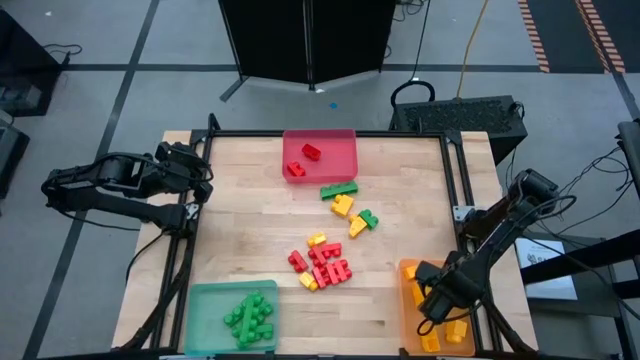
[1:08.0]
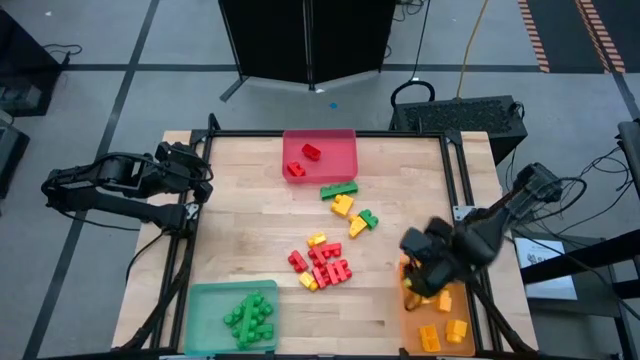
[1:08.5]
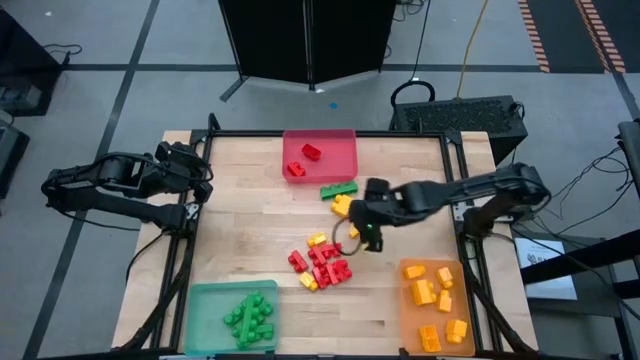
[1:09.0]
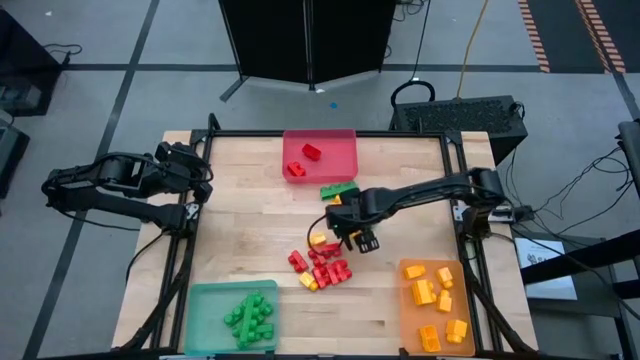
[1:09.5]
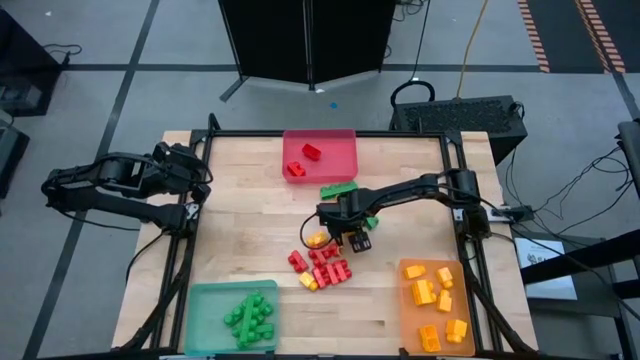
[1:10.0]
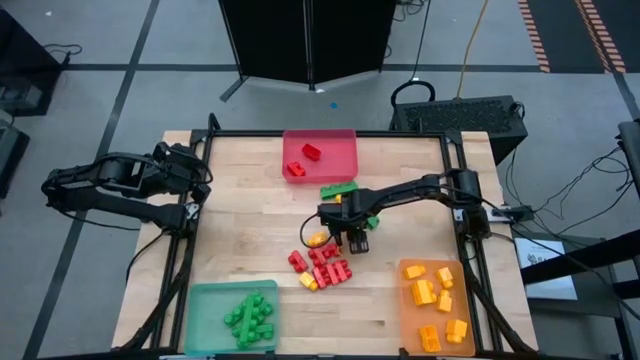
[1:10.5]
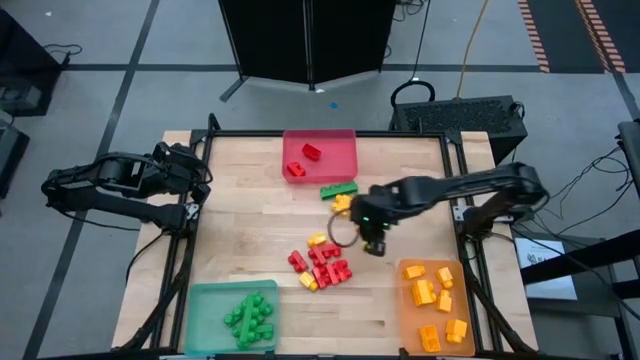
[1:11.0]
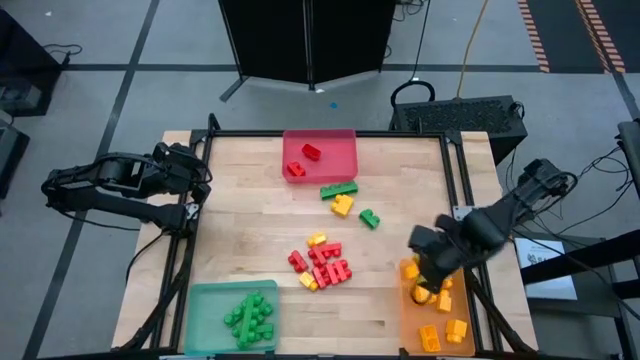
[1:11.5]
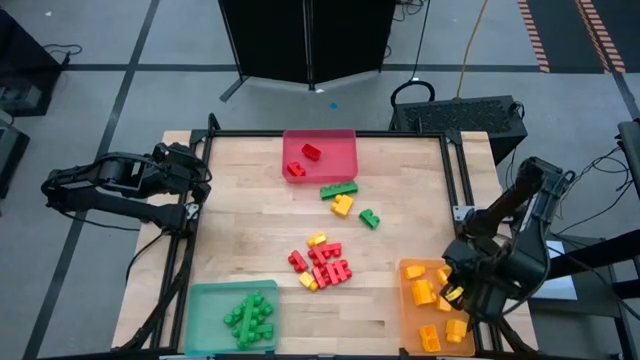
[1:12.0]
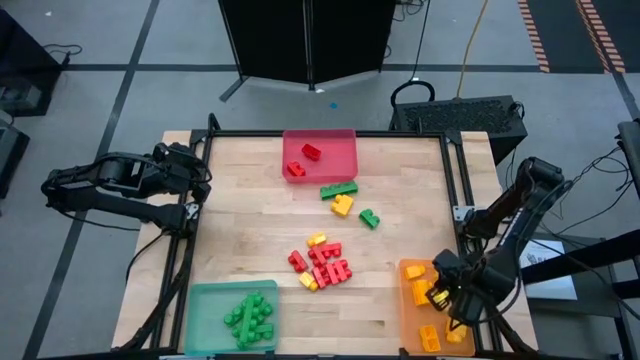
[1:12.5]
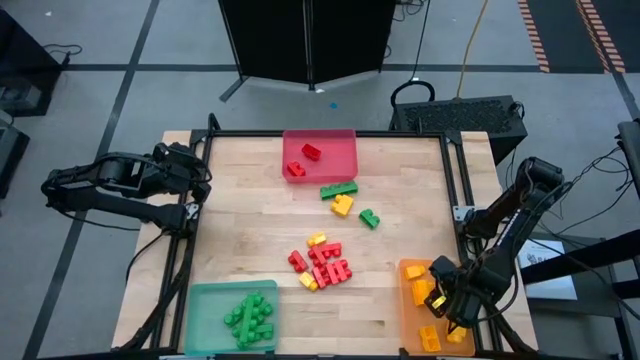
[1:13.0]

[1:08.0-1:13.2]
Task: Sort blocks
Put the yellow game piece into the orange bin

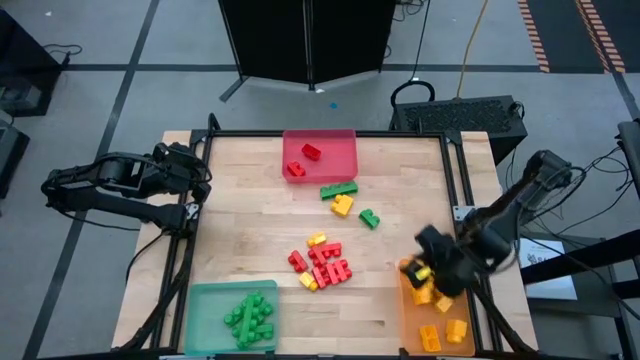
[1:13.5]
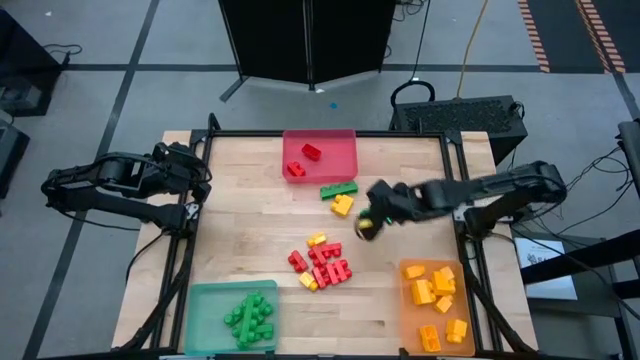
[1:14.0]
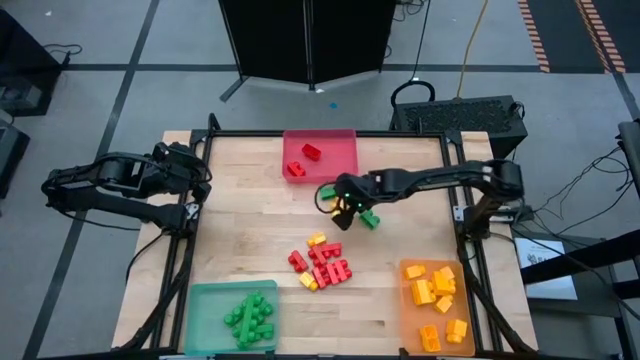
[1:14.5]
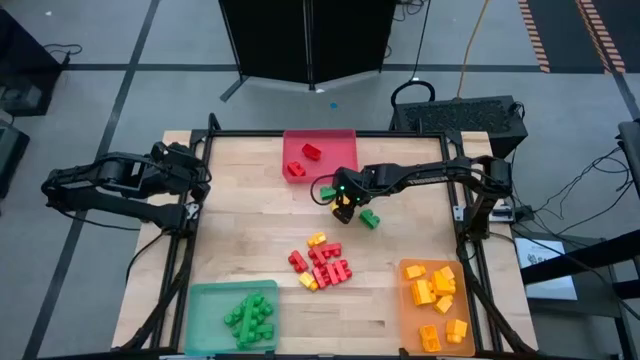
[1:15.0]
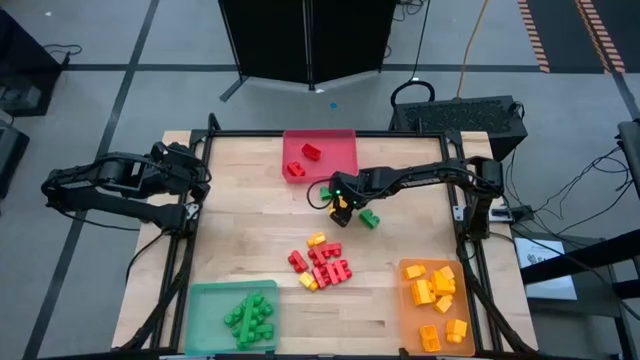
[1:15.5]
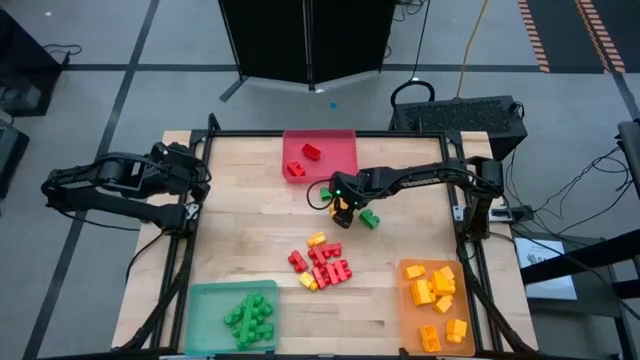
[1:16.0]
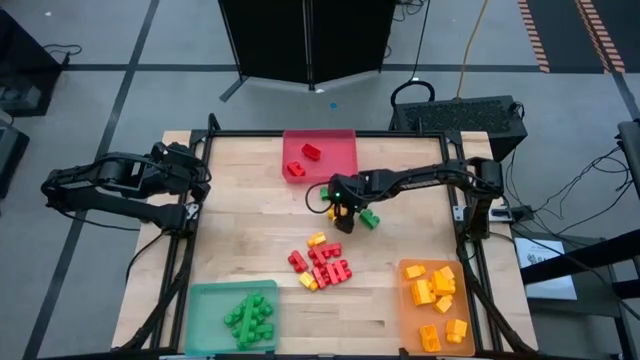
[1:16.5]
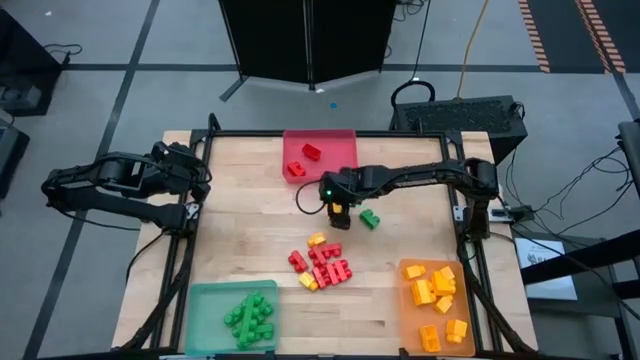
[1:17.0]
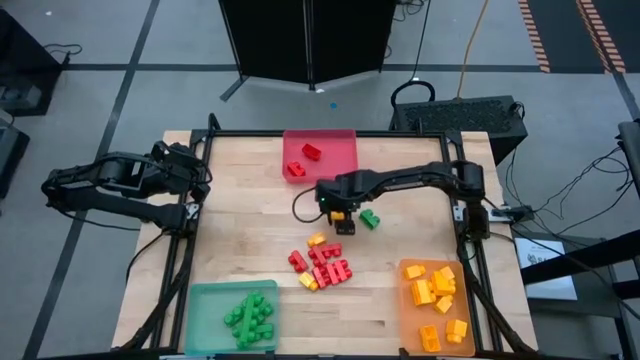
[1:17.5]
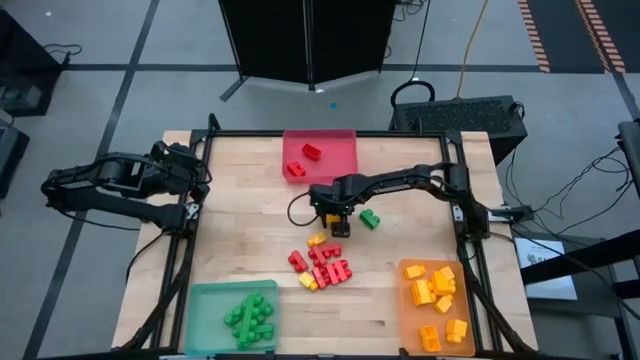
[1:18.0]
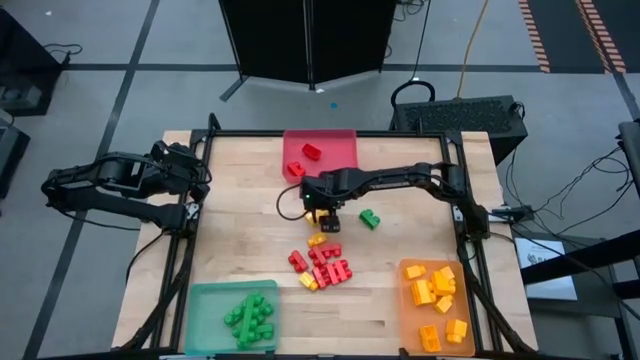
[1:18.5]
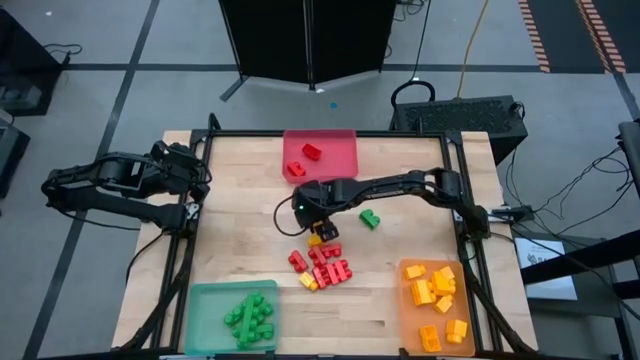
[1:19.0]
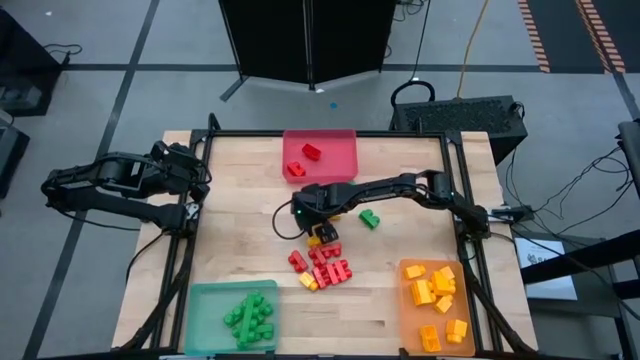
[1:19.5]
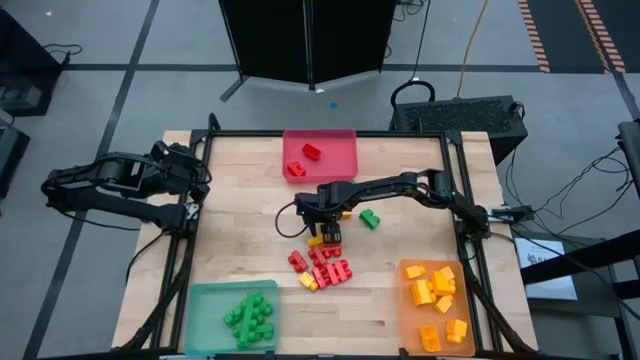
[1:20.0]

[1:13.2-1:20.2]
Put the yellow game piece into the orange bin

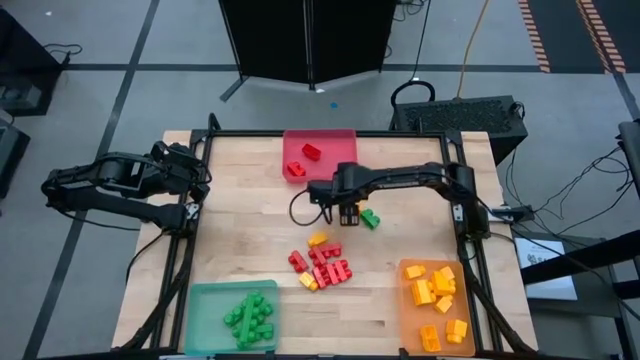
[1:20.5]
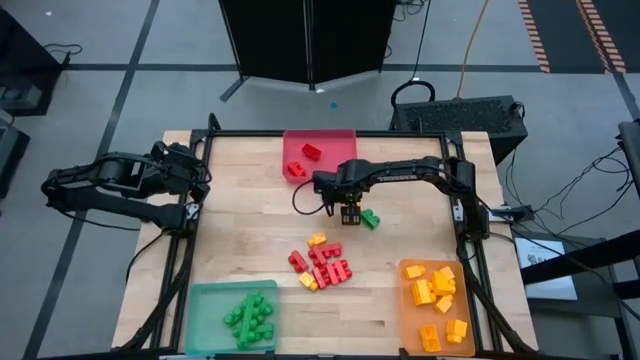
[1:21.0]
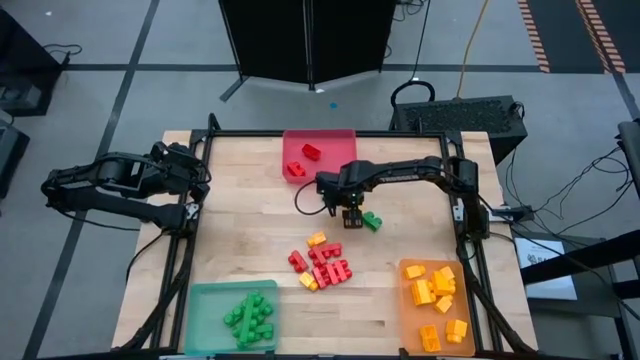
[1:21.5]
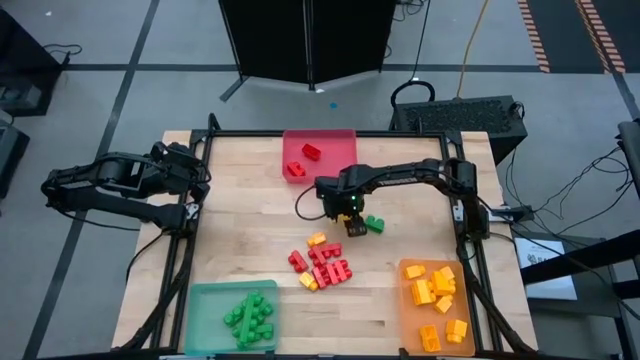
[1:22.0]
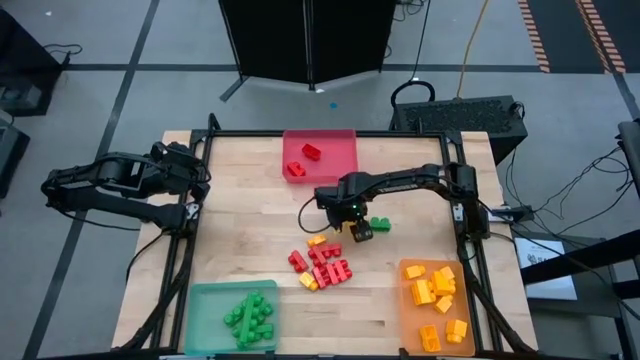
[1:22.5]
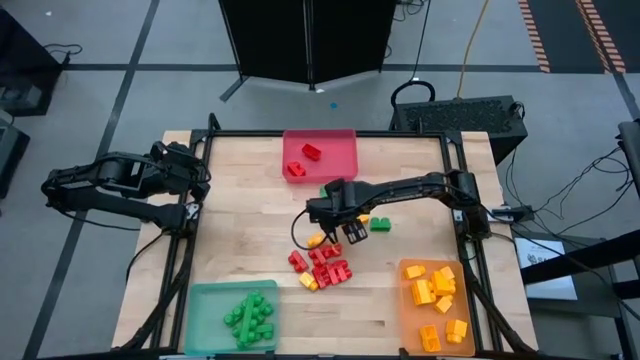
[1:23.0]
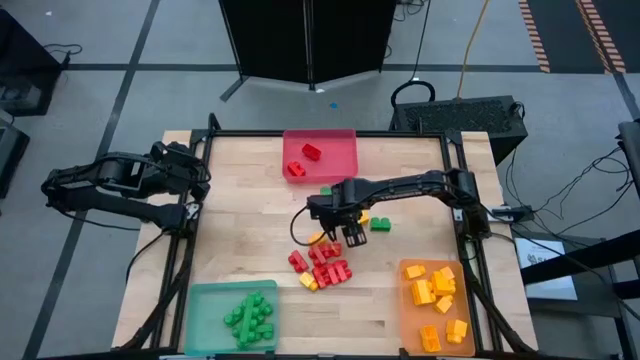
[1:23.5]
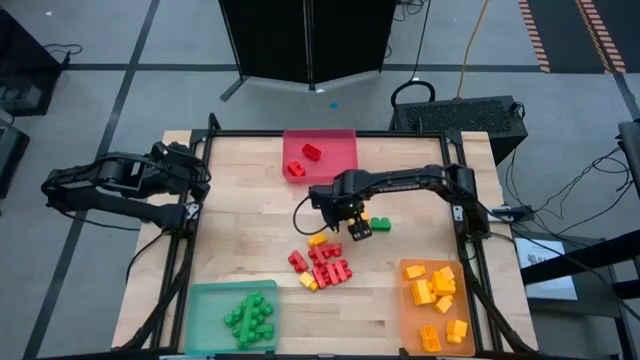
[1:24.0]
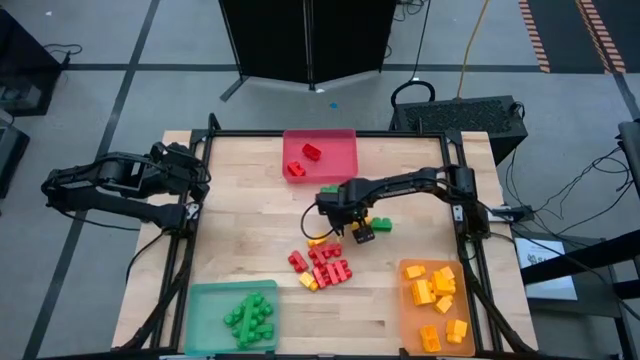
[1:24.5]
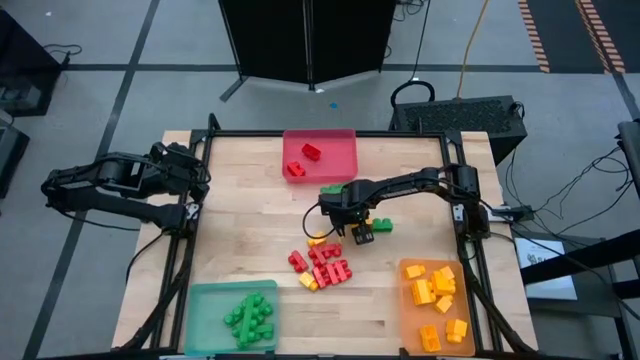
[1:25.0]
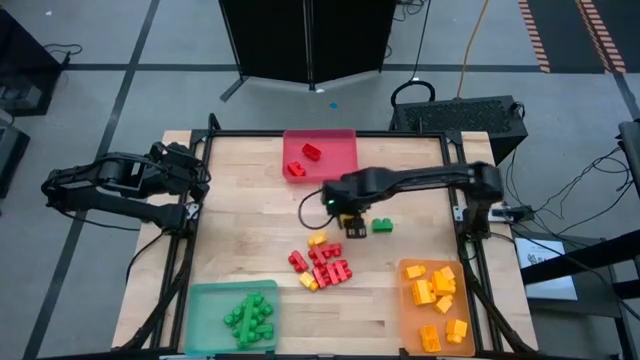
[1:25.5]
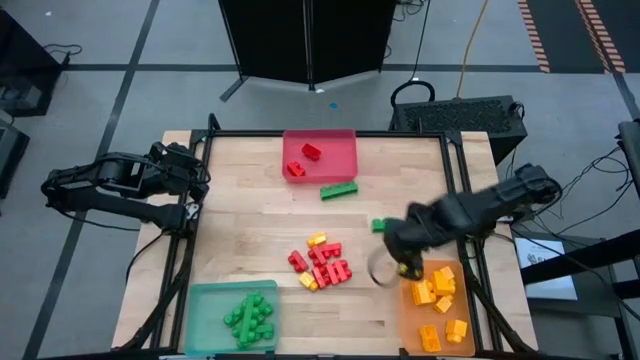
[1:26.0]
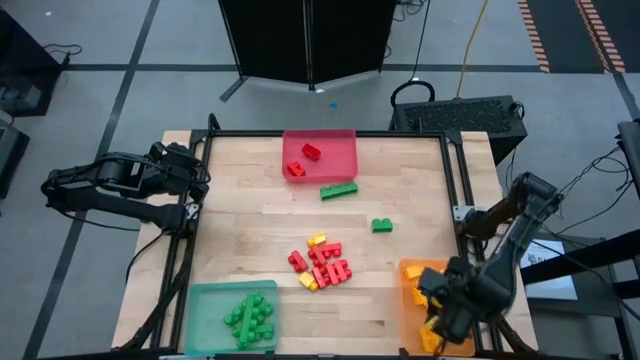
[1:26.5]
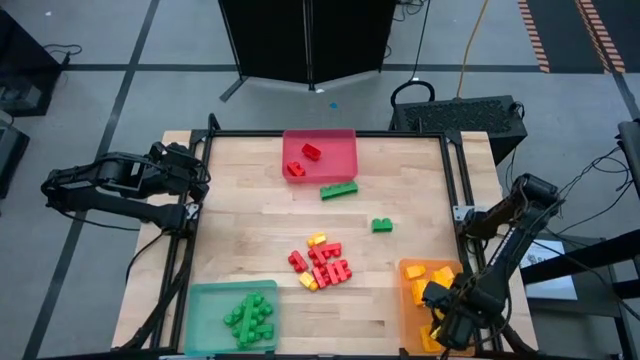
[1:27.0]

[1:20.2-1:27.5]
Put the yellow game piece into the orange bin

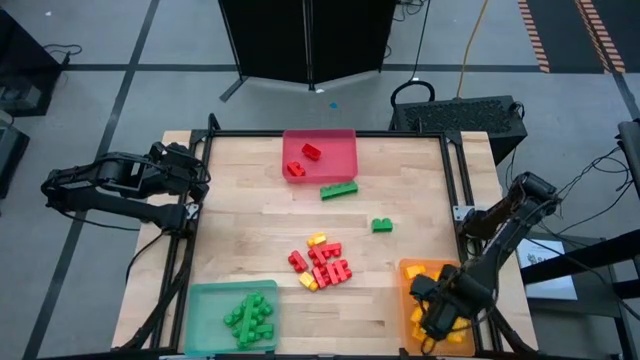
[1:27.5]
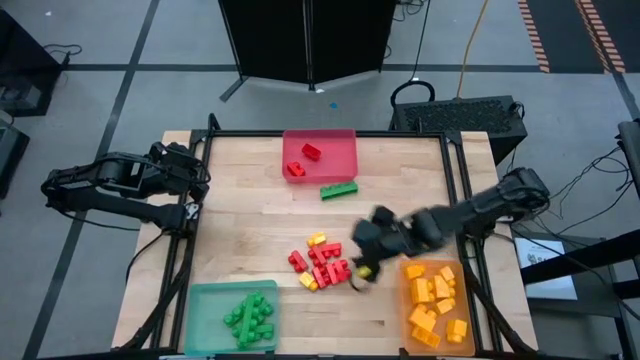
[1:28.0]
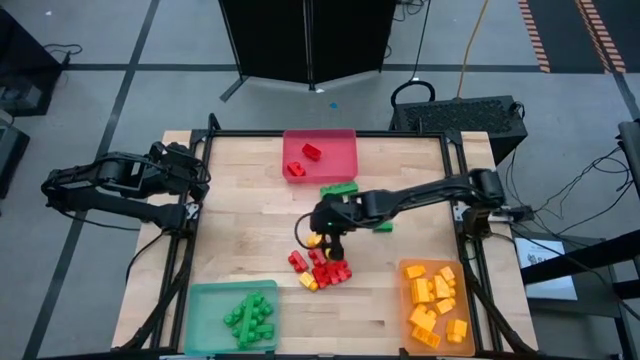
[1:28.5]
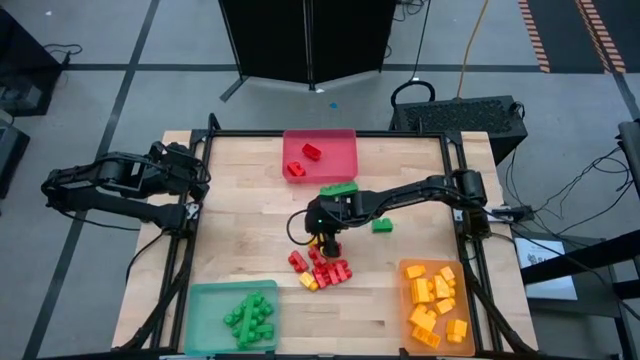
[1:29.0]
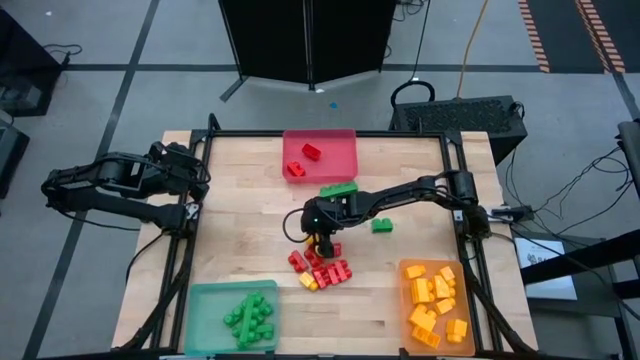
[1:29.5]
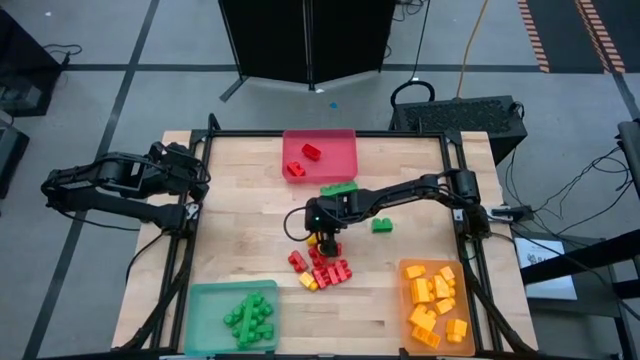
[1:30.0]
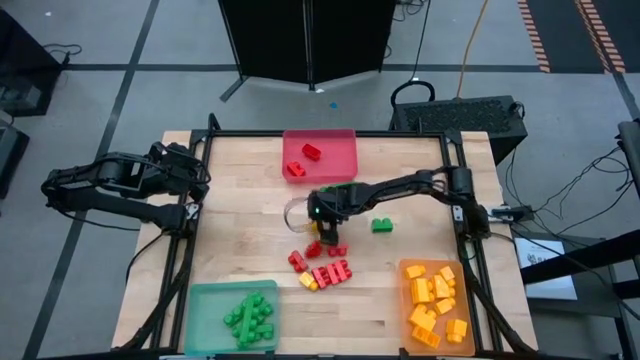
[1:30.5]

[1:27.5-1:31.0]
Put the yellow game piece into the orange bin
